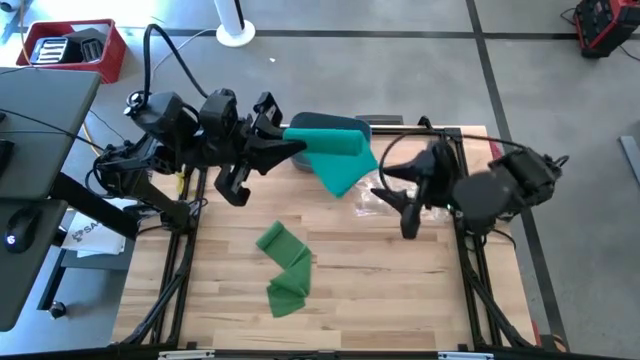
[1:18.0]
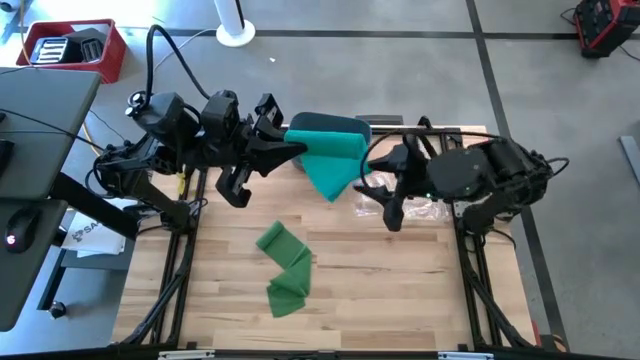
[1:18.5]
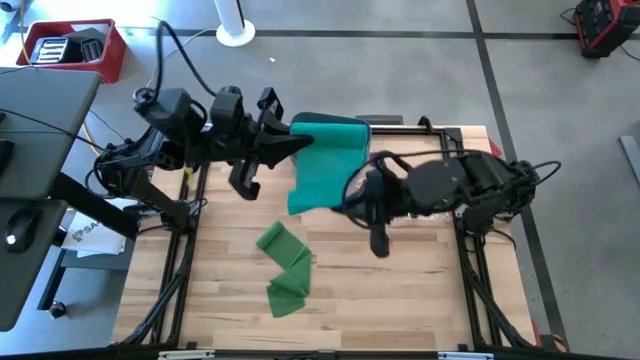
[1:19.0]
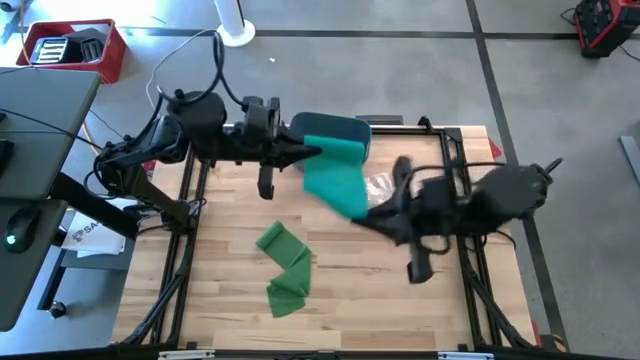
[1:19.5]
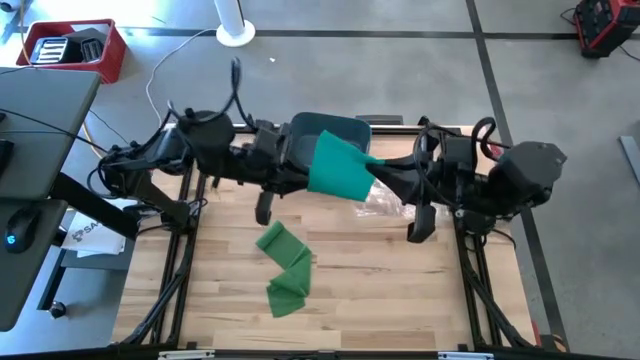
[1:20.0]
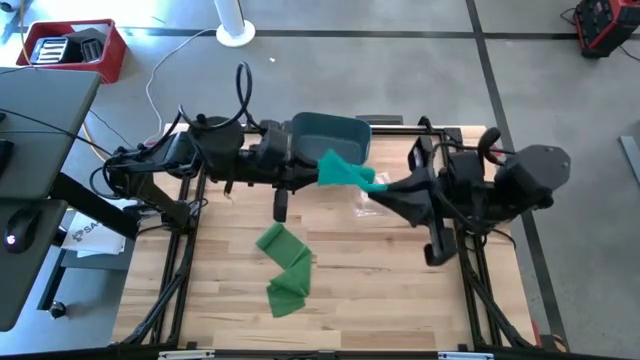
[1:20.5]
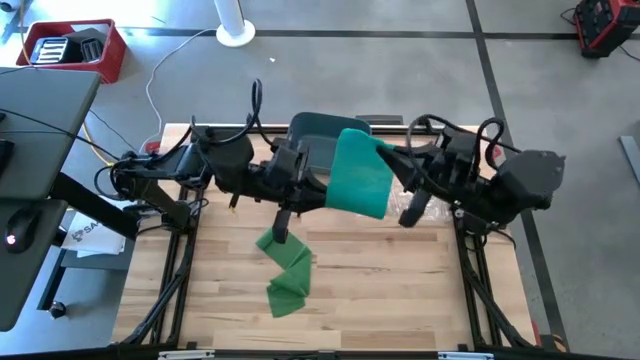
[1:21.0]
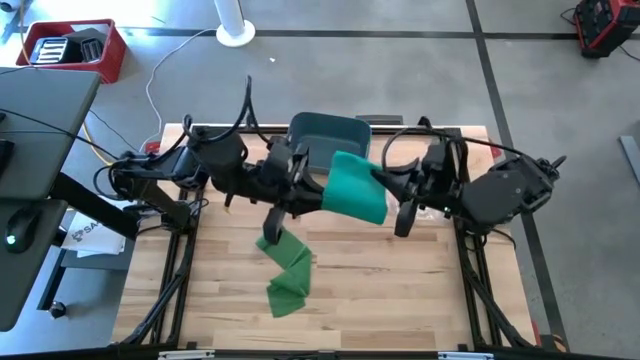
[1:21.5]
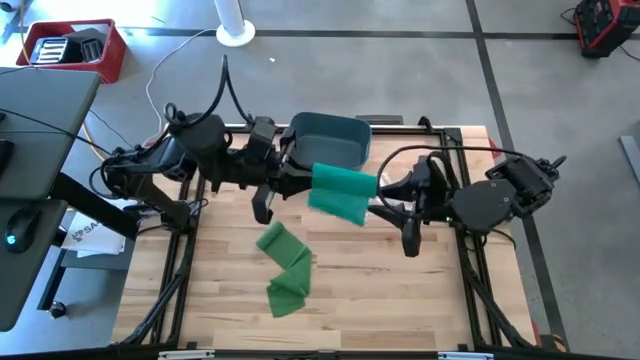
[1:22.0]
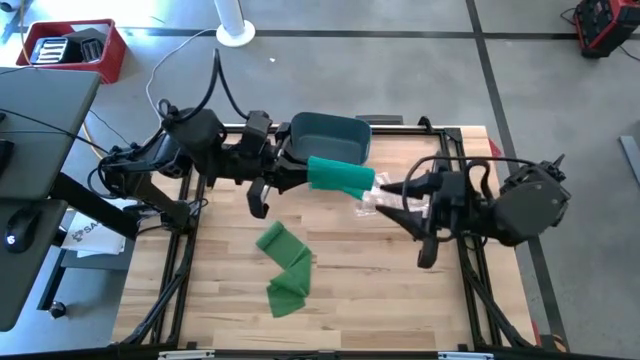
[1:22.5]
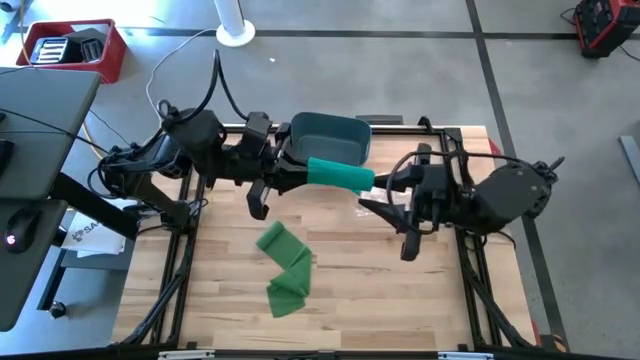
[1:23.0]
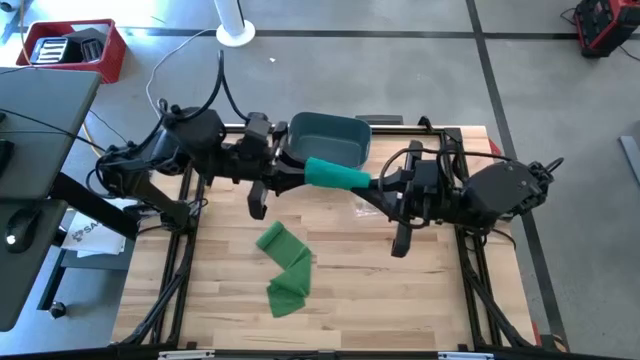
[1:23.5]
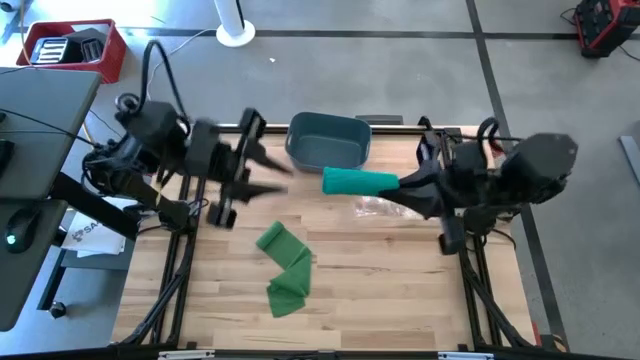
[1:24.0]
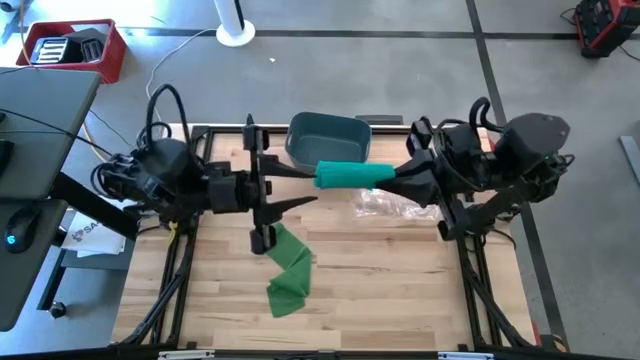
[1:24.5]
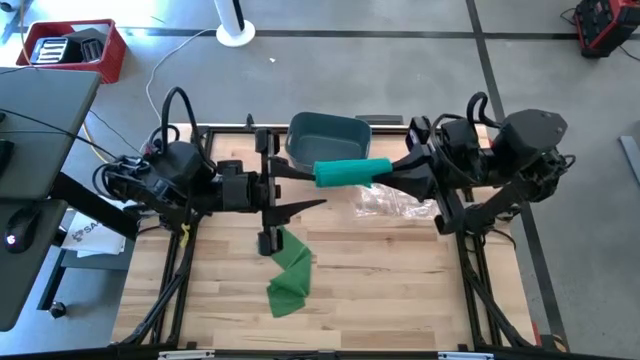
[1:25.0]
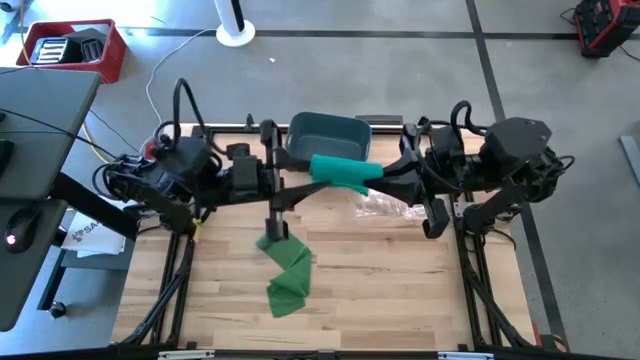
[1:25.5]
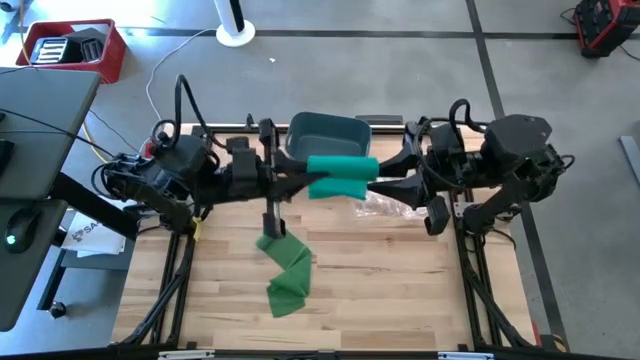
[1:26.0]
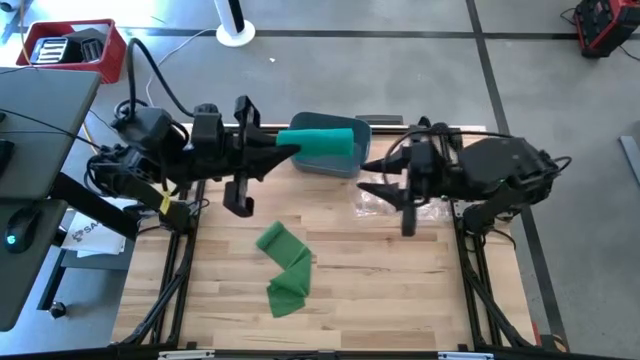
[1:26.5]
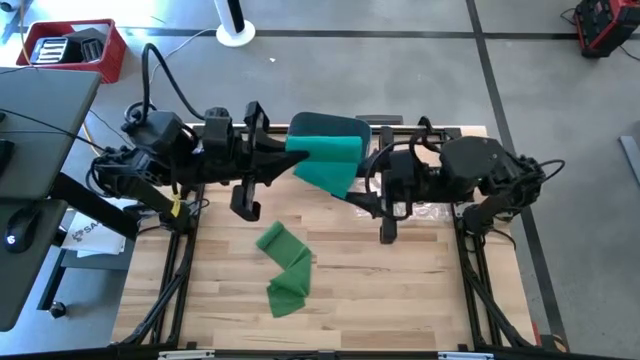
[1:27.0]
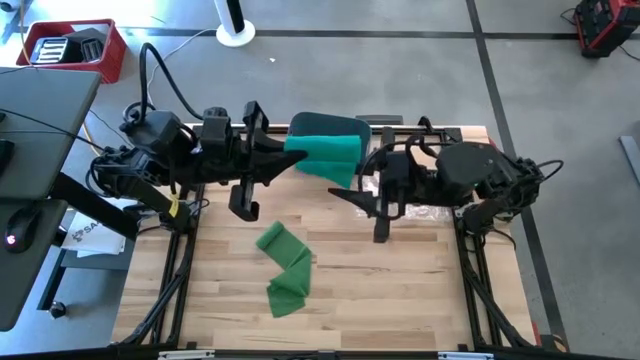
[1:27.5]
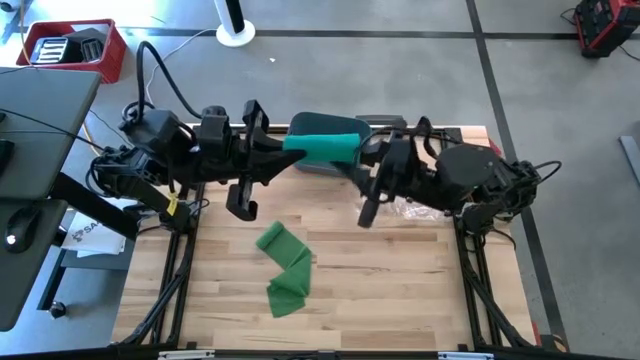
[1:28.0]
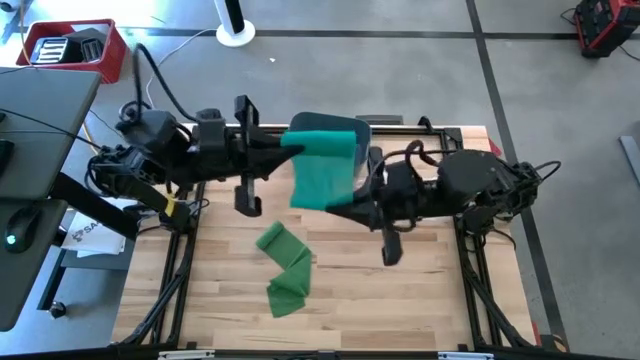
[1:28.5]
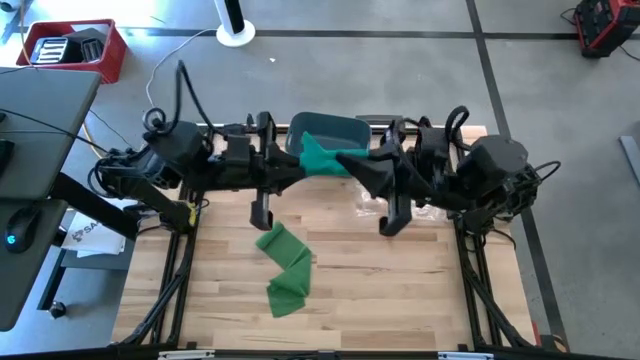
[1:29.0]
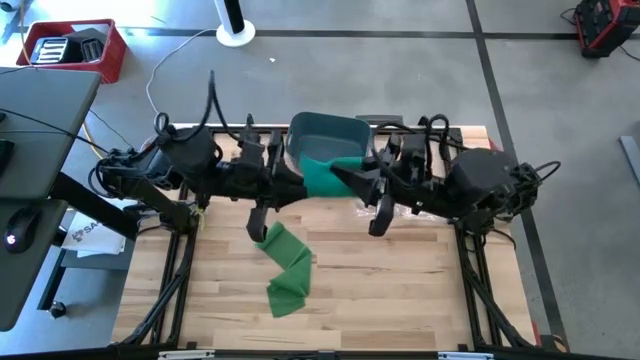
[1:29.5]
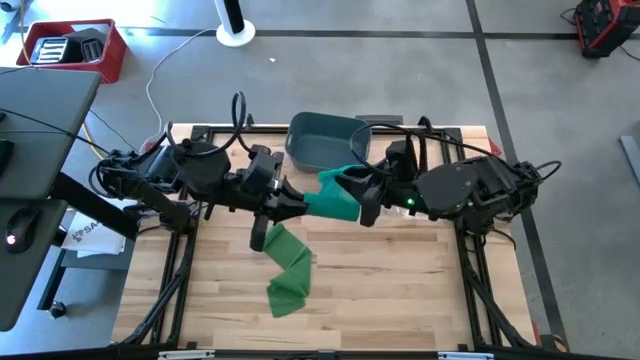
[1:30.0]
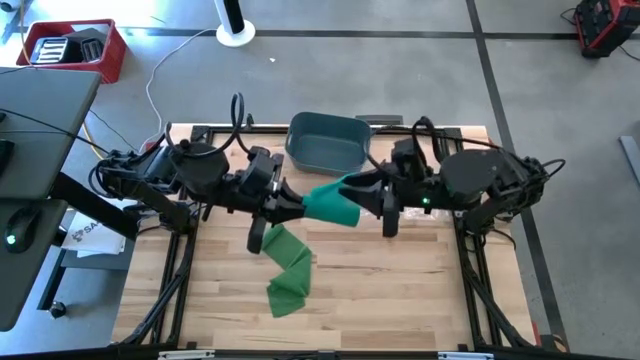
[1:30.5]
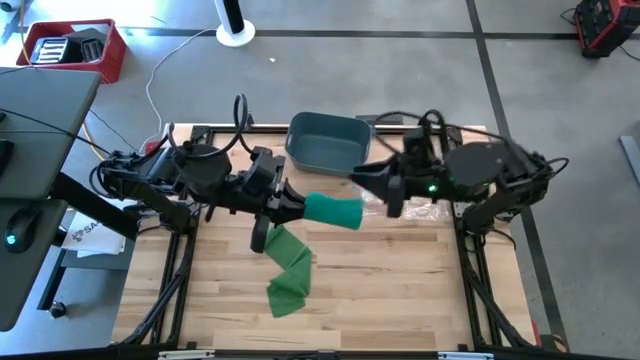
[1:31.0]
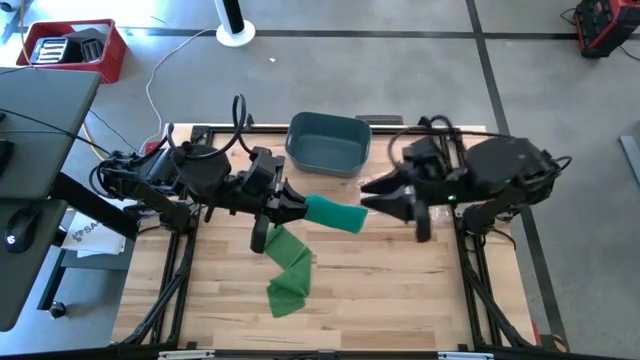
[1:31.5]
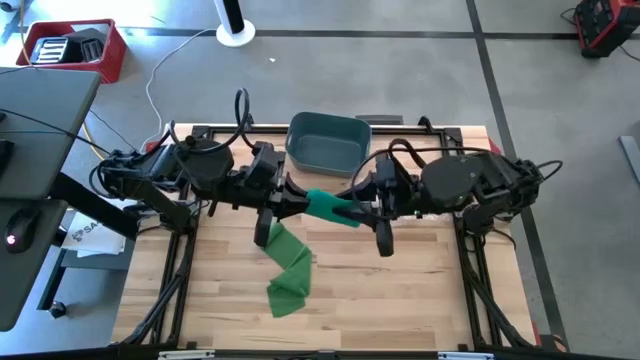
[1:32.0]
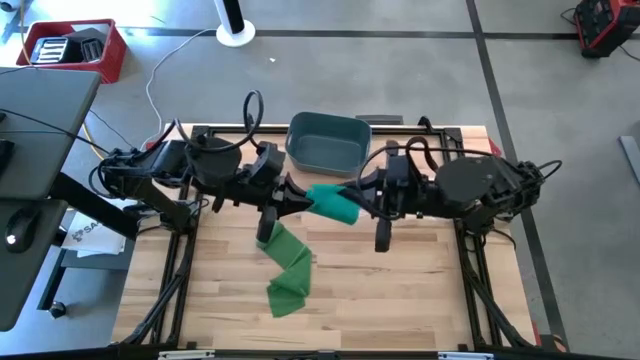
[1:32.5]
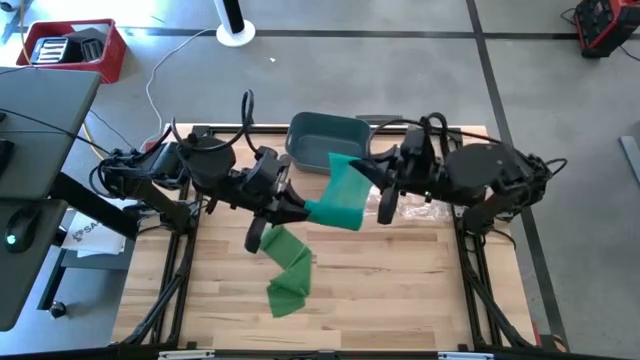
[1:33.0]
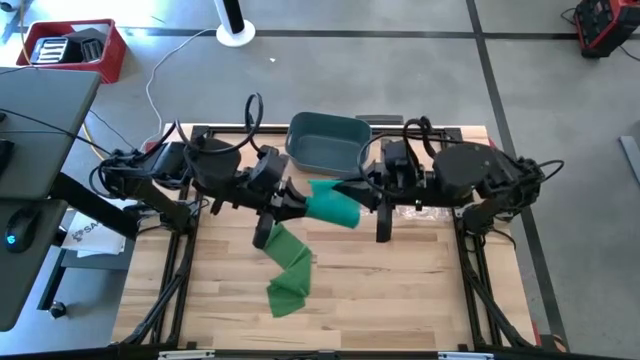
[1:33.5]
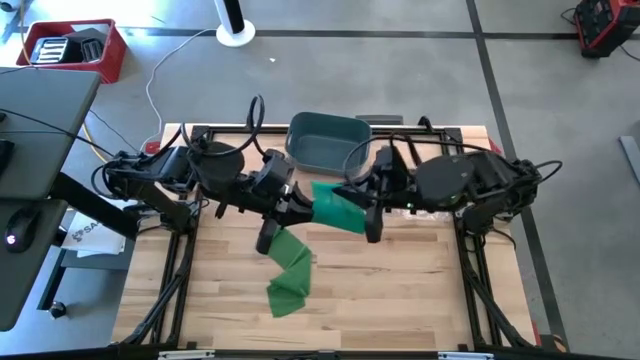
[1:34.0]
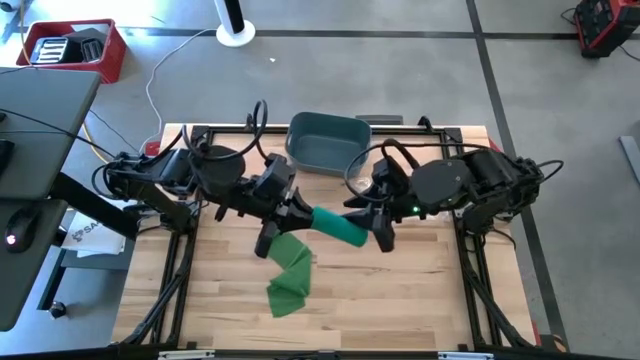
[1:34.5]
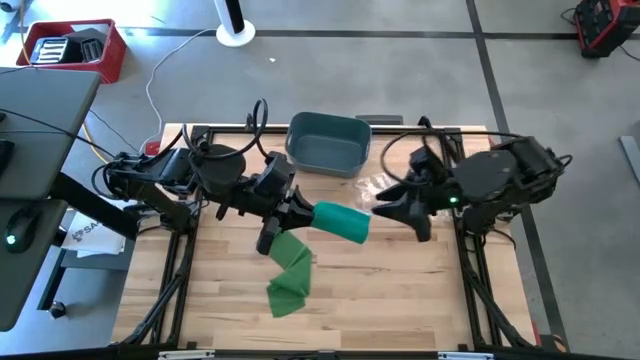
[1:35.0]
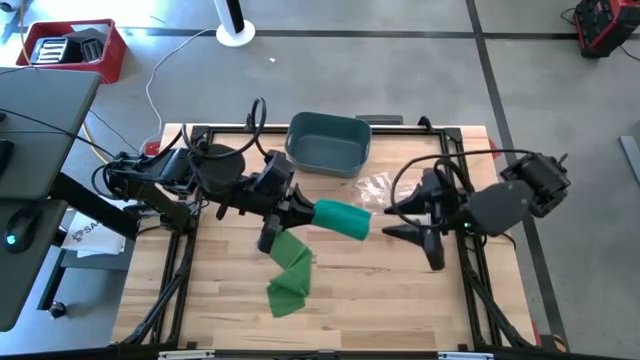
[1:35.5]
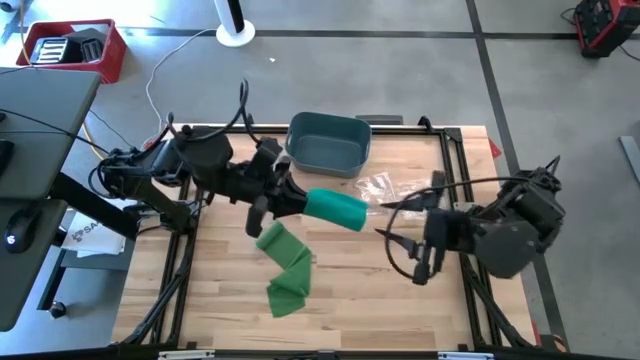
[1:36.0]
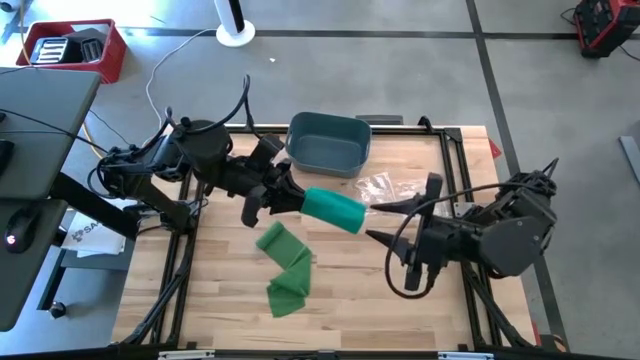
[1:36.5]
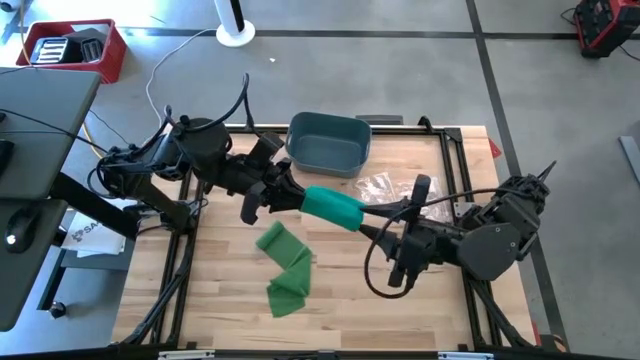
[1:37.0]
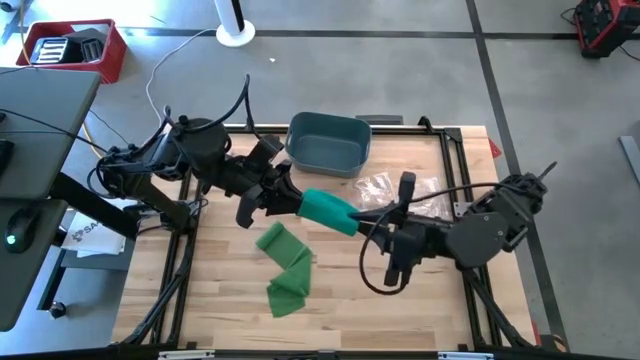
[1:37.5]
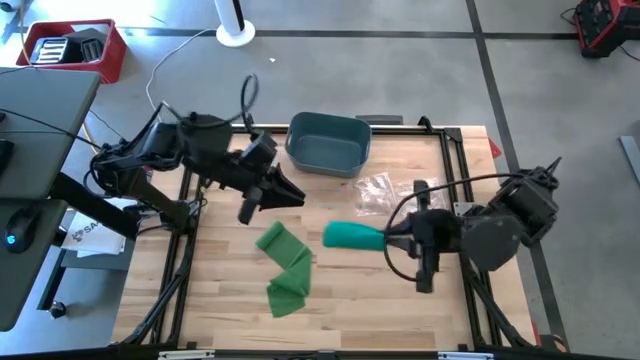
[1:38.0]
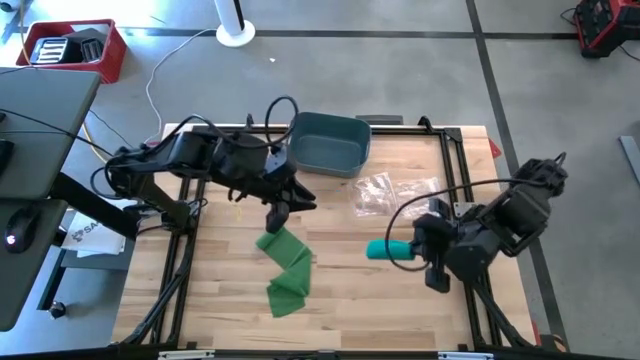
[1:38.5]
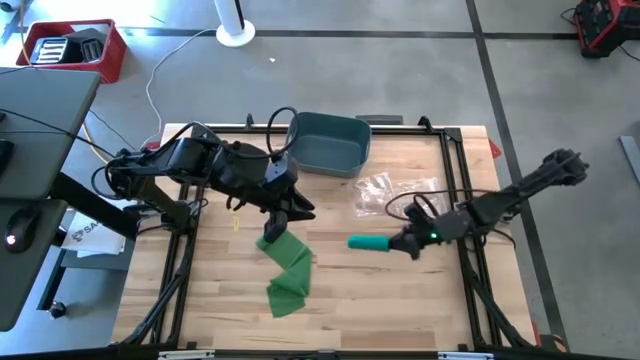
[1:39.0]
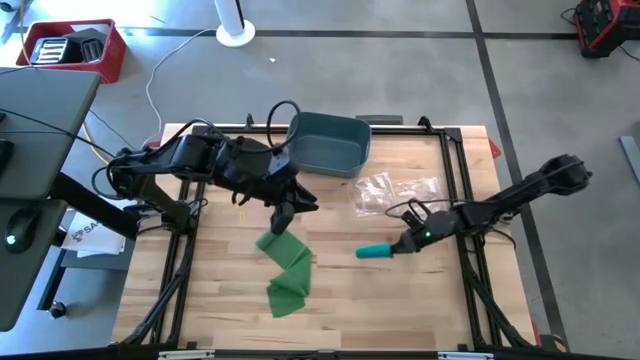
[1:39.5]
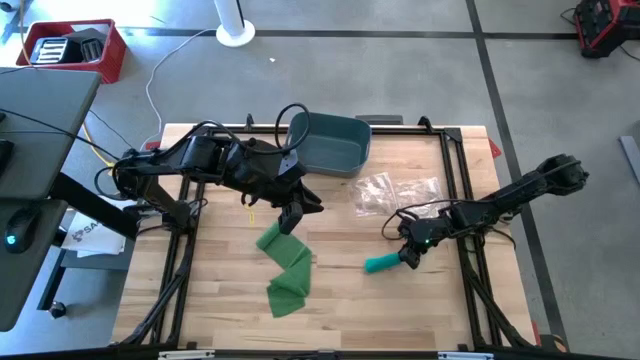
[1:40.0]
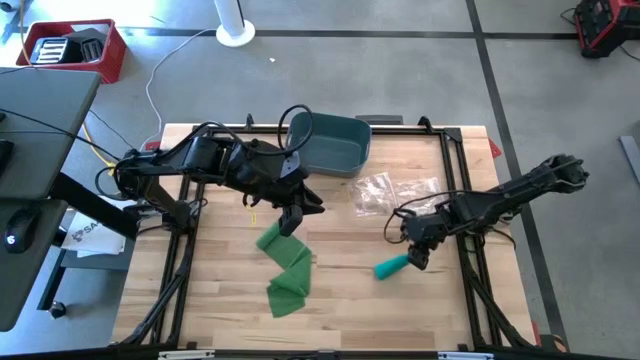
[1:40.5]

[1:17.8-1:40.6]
Task: Roll bandage
Roll the blue bandage
